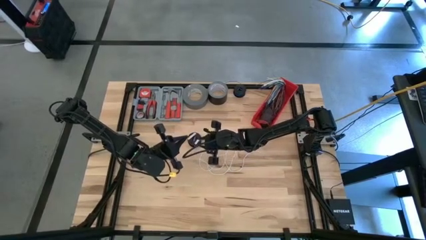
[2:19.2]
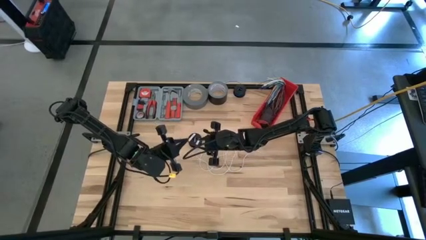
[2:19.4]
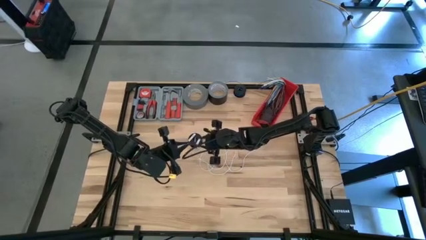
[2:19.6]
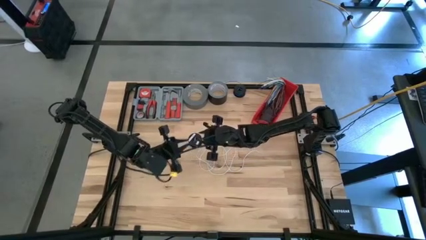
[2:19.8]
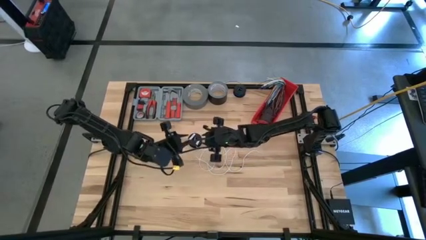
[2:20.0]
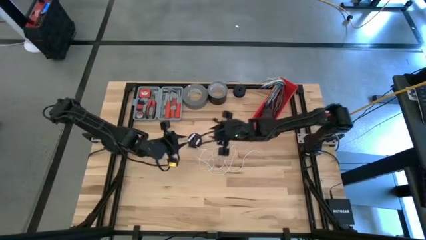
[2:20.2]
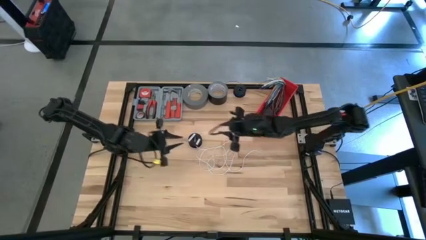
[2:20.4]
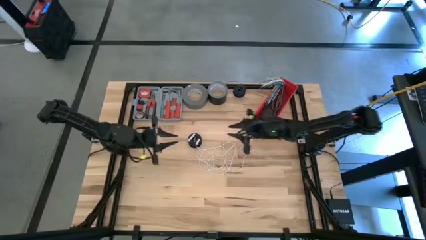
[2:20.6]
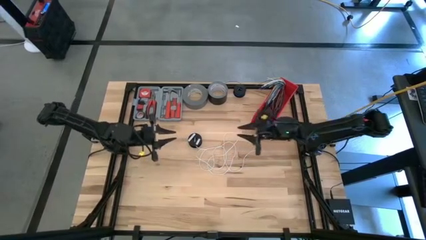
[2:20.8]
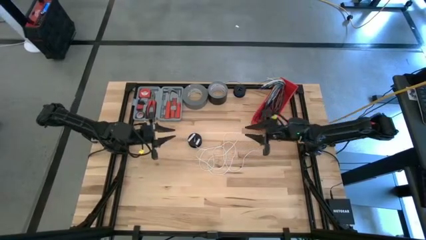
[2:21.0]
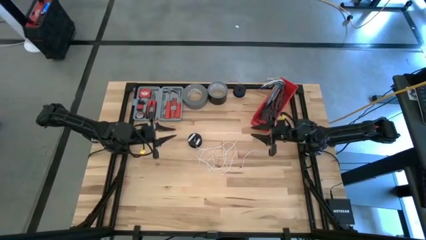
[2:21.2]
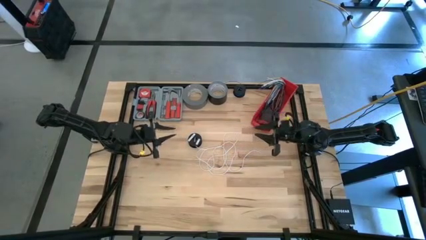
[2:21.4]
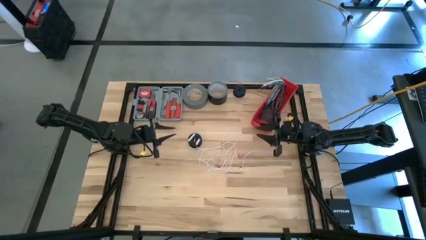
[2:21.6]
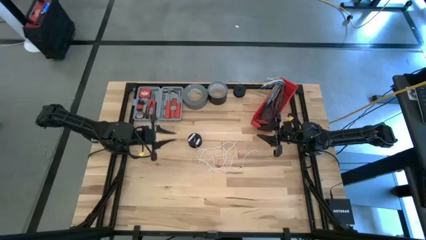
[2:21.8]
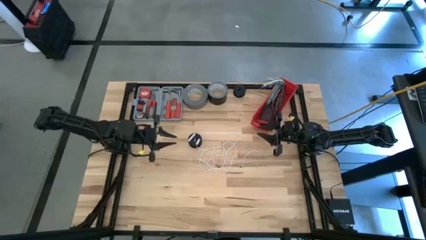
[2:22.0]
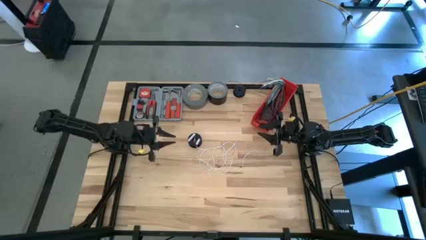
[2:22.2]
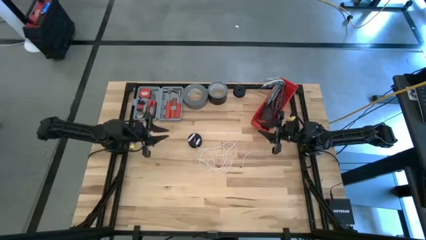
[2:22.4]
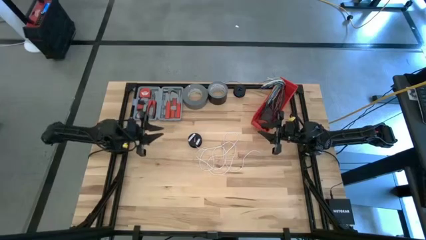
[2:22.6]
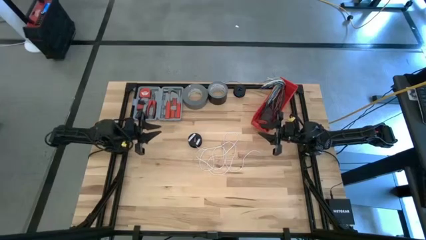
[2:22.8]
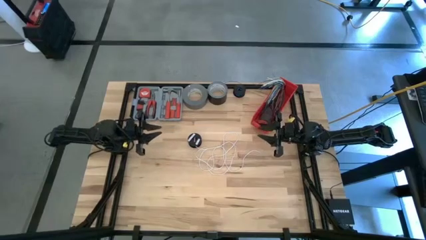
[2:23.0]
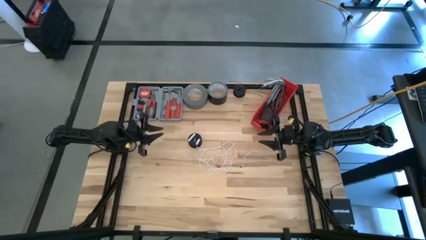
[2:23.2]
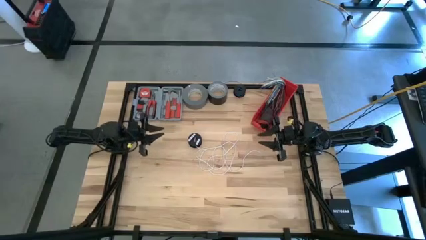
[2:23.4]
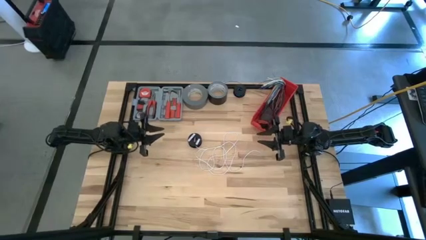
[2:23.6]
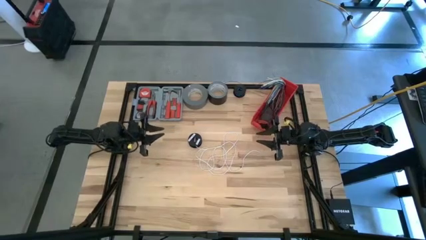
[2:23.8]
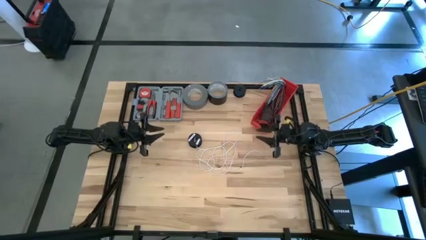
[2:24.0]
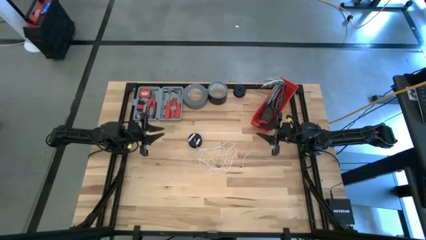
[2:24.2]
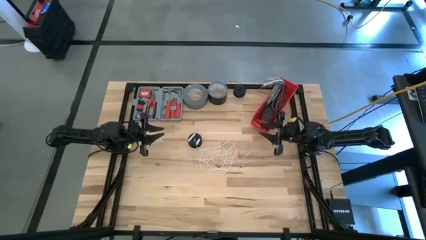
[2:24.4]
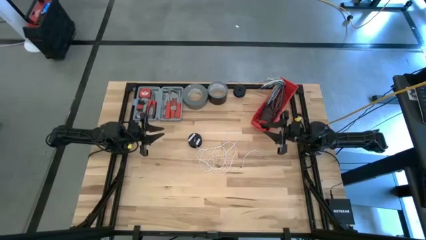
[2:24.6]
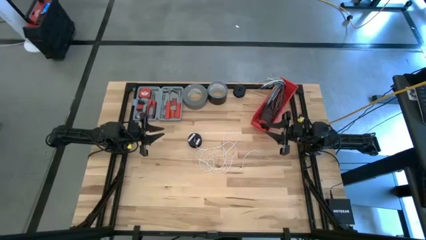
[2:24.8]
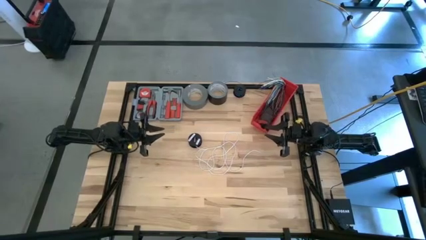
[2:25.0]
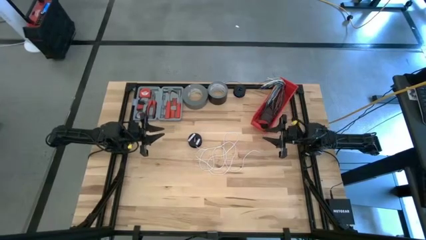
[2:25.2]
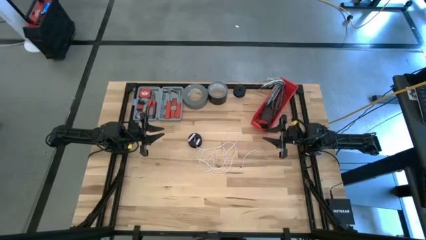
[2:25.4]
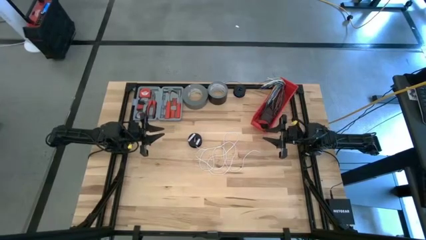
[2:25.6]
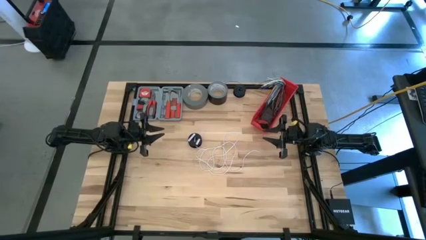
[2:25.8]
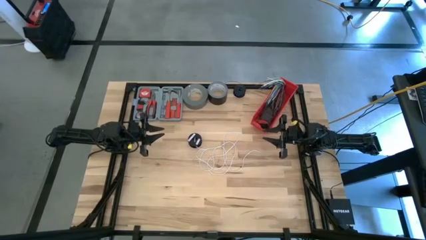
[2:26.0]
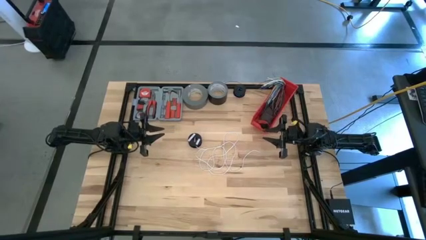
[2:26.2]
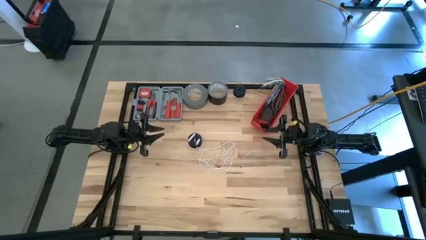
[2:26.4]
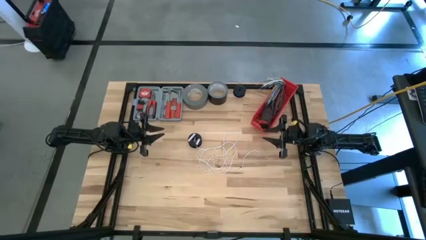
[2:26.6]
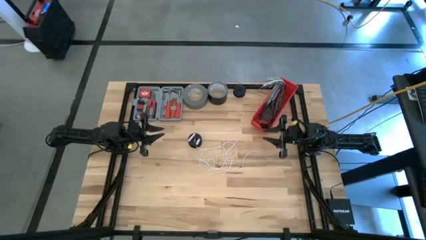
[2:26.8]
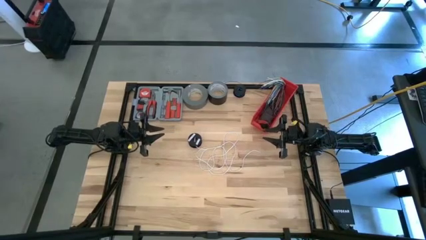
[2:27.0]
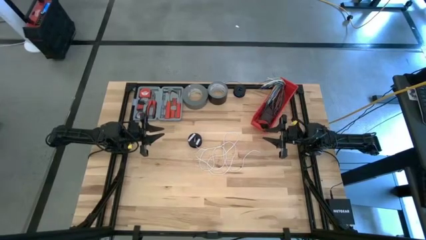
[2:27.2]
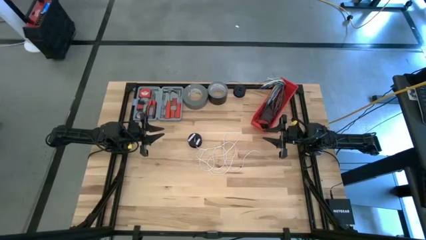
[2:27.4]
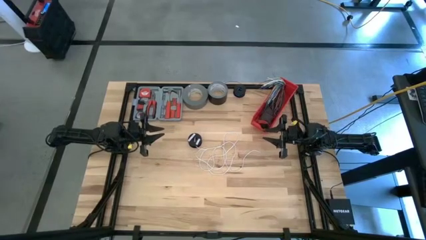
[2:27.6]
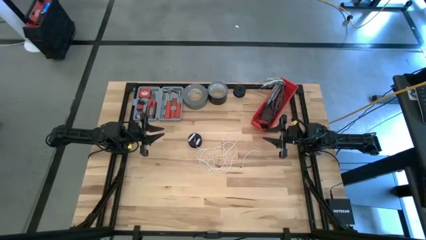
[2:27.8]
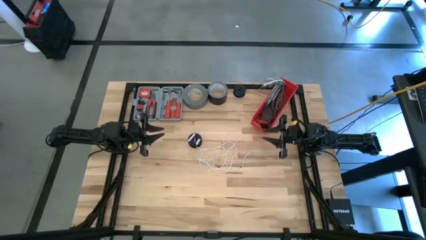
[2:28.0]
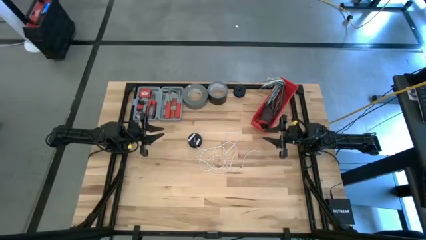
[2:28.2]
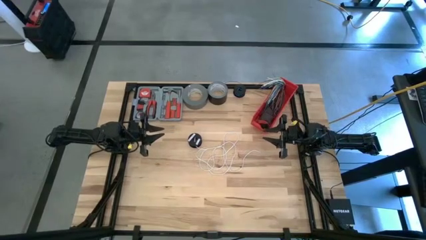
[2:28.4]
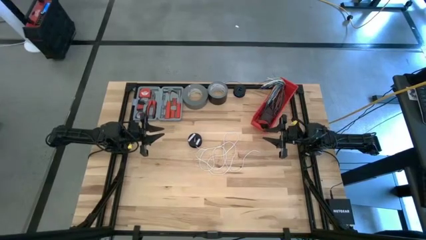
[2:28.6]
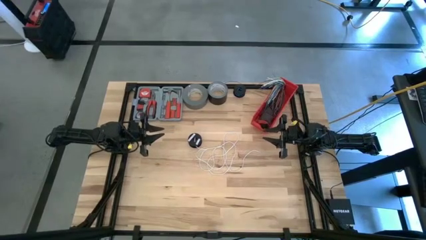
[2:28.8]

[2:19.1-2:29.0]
Task: Coil cords
Return to Home Position

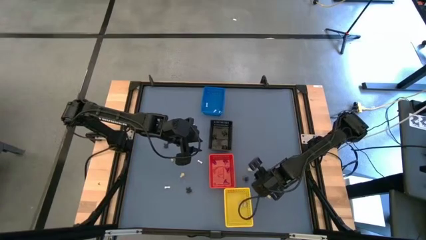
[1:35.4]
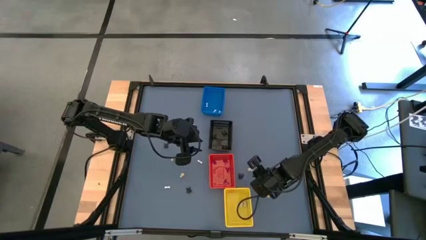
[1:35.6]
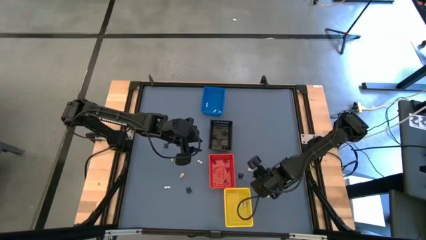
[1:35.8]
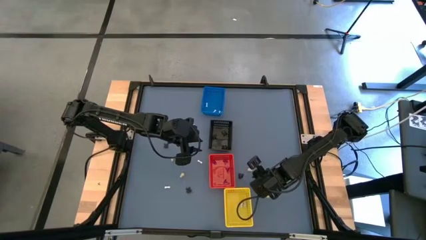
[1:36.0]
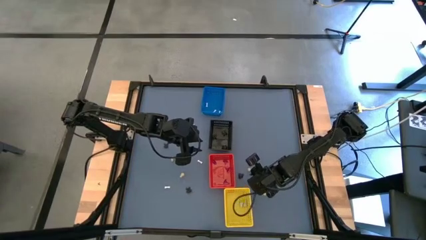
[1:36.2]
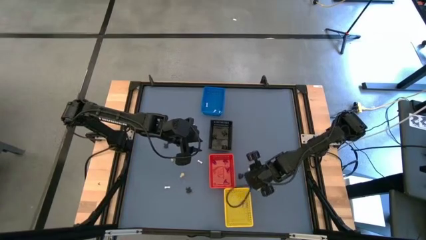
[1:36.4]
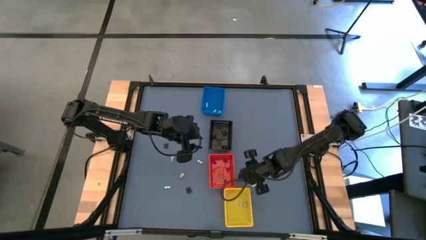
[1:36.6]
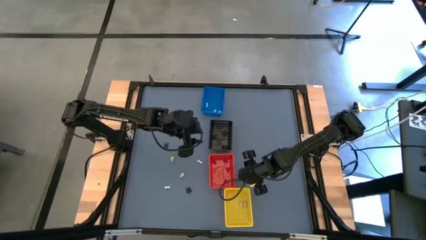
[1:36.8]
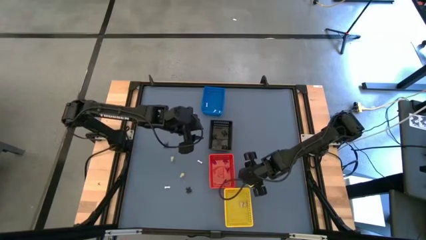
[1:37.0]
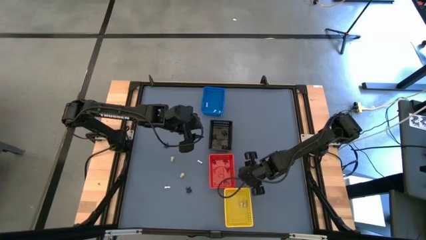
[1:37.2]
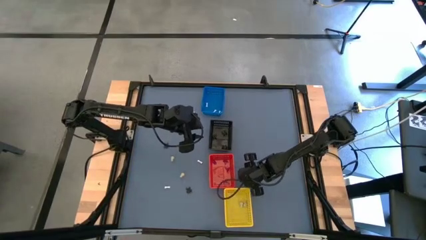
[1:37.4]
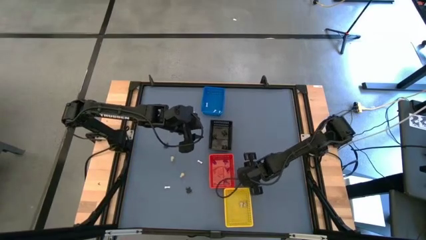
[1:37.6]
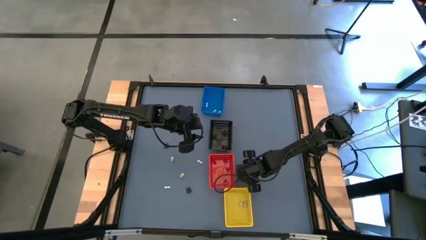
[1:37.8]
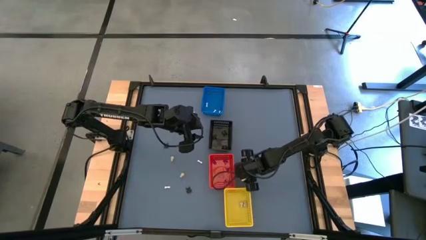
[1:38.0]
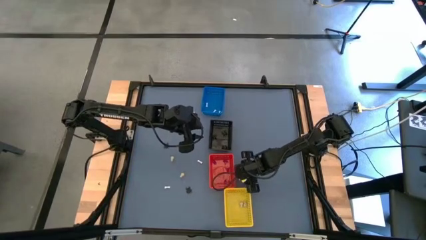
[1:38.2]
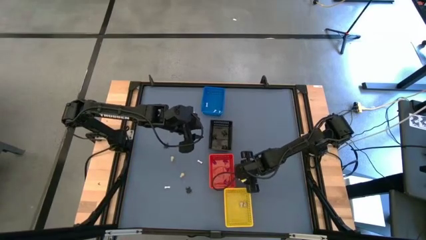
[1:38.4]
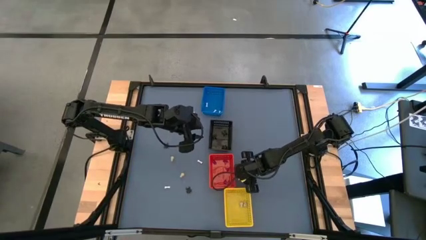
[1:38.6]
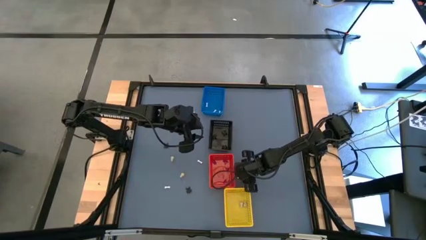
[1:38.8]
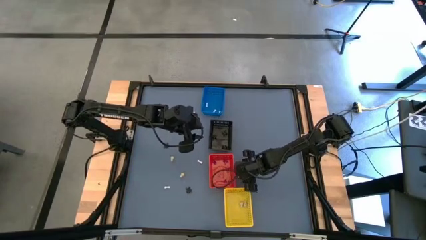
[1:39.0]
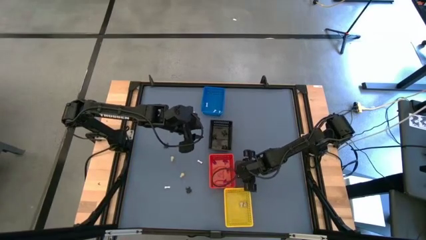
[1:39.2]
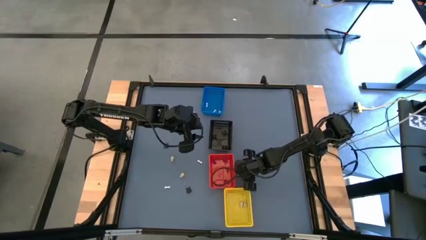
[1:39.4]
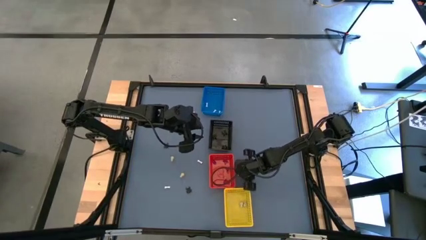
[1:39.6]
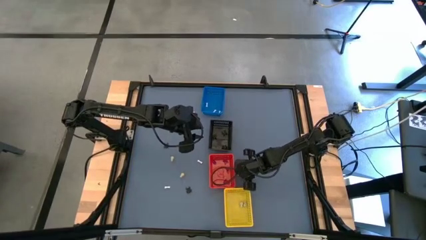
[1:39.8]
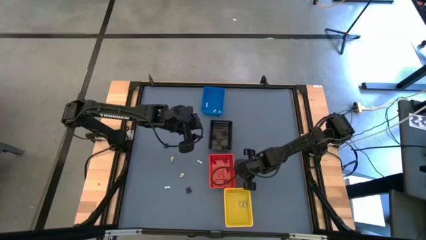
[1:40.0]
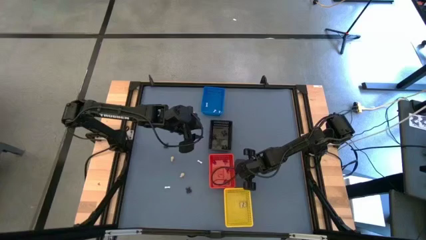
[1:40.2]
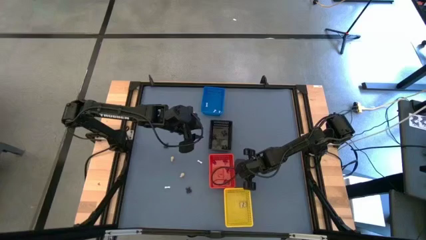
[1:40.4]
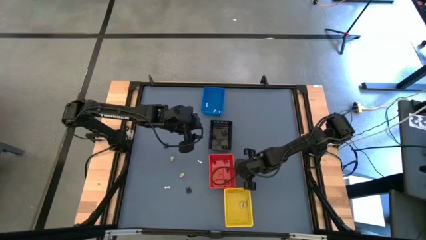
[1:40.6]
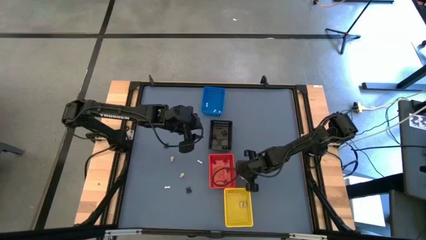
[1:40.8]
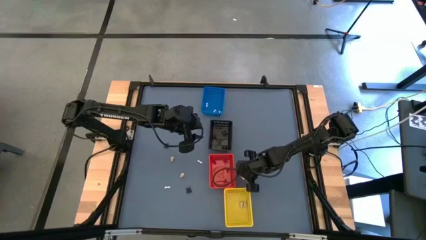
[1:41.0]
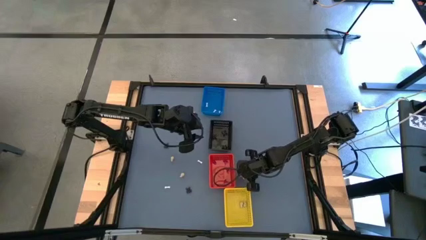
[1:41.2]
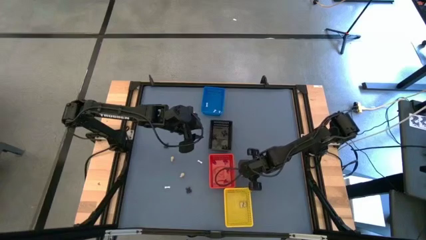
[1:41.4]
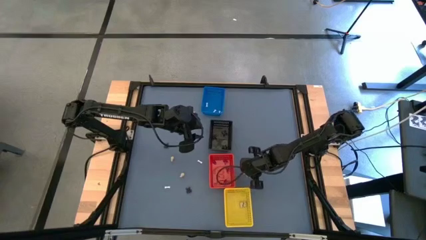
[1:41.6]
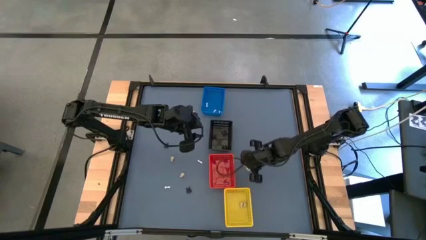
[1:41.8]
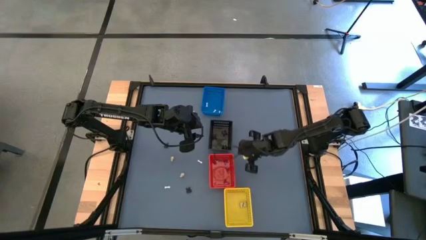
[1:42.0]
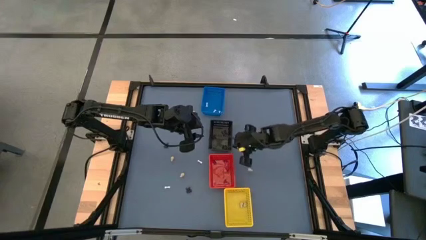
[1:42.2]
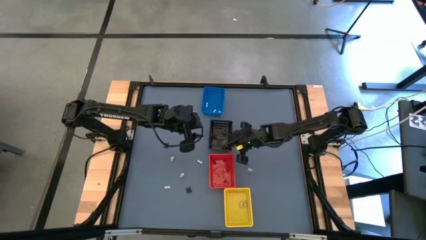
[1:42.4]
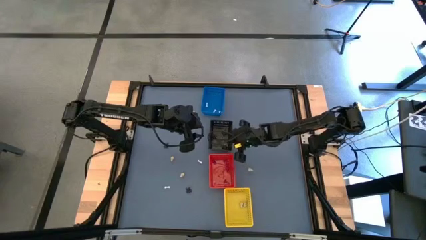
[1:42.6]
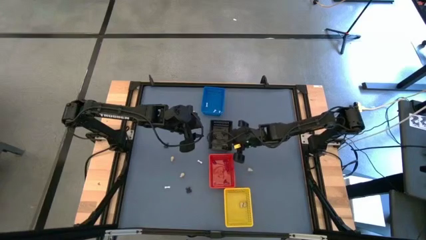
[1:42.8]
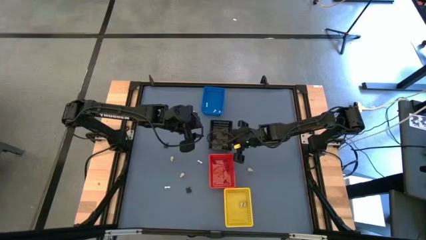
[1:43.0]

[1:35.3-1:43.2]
Task: Sort Halloween decoration
Put the black spider toy into the black bin
